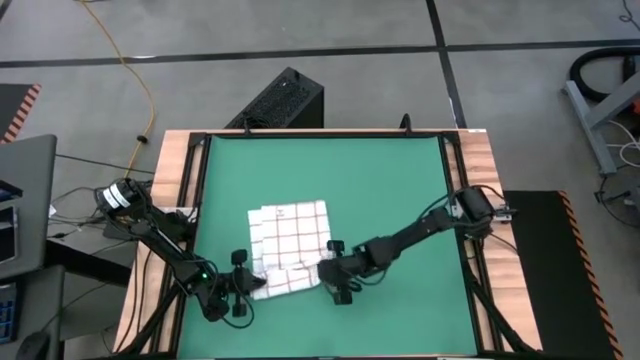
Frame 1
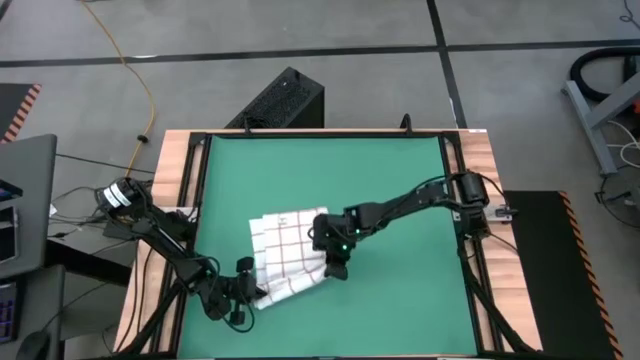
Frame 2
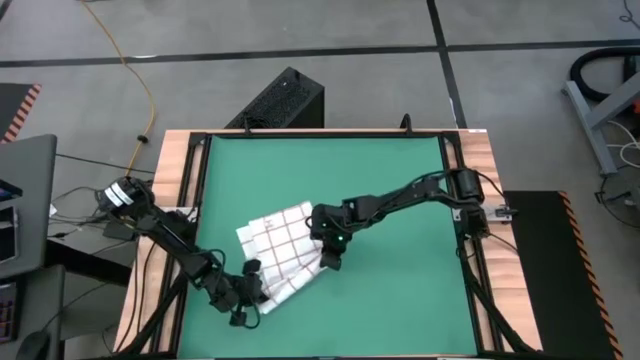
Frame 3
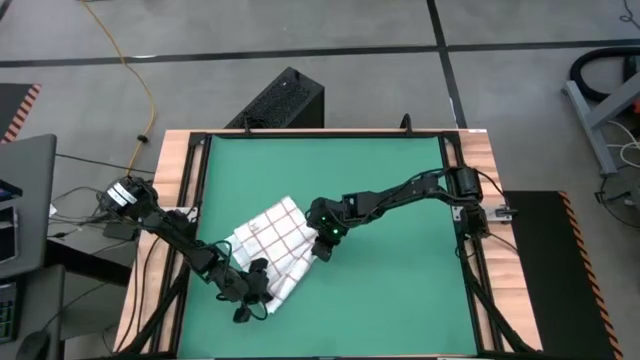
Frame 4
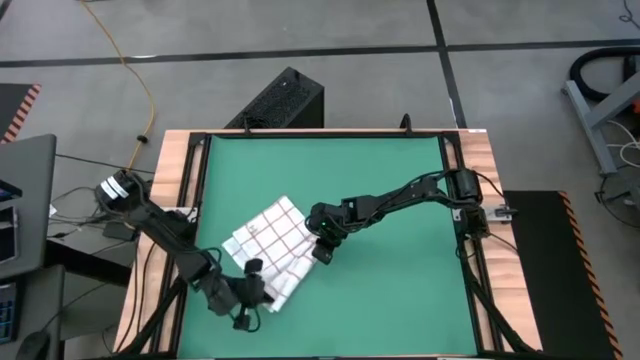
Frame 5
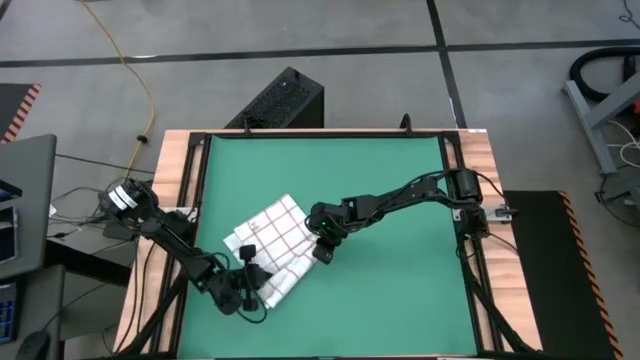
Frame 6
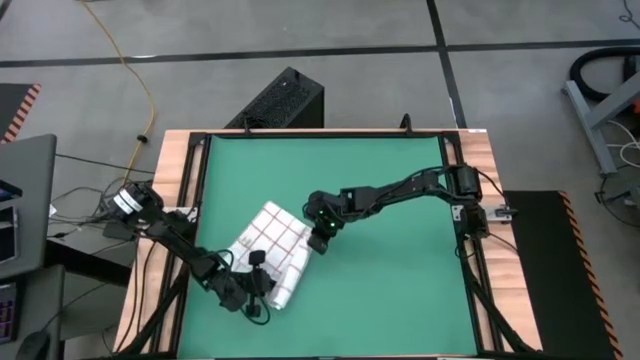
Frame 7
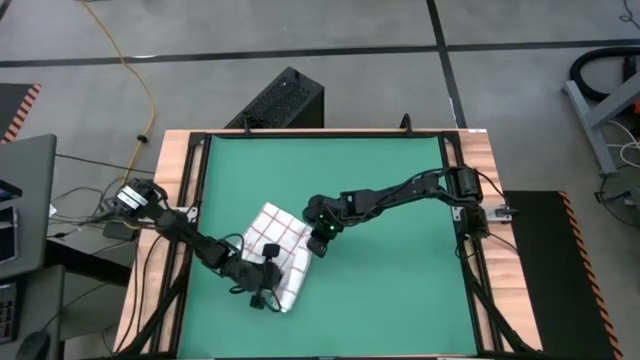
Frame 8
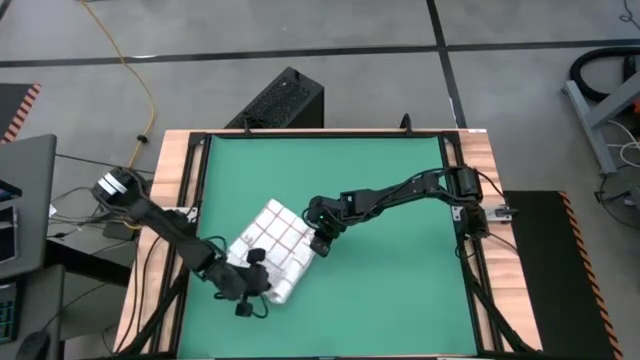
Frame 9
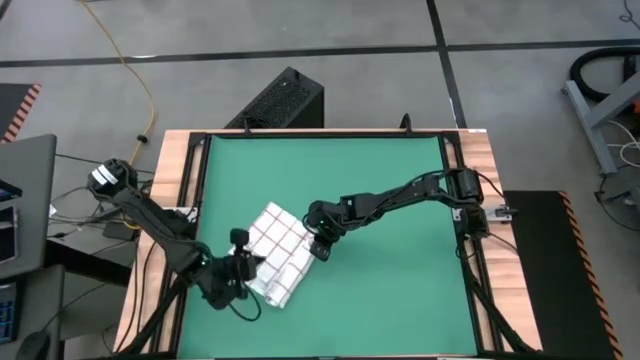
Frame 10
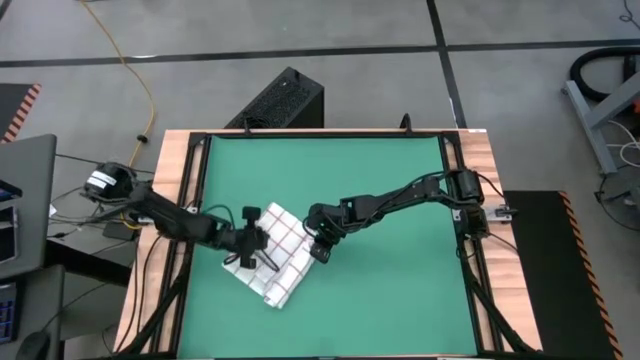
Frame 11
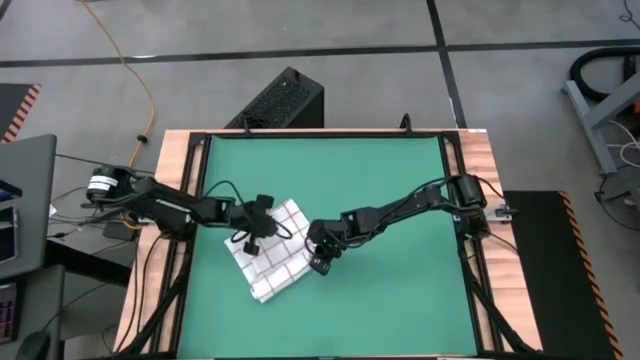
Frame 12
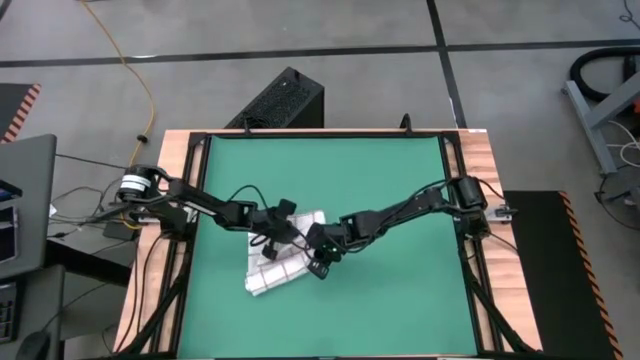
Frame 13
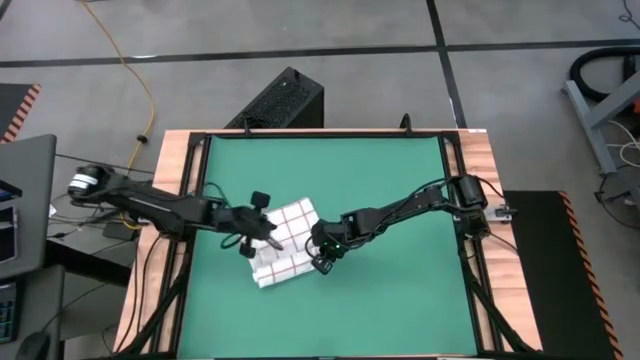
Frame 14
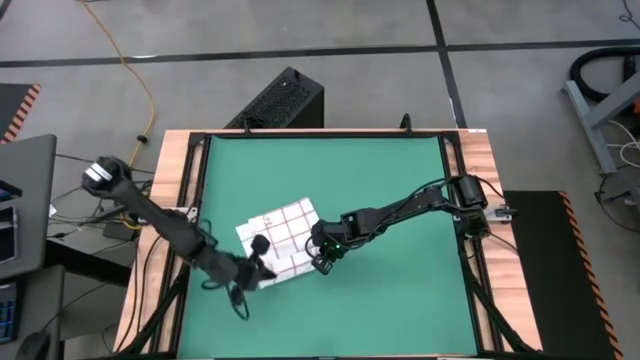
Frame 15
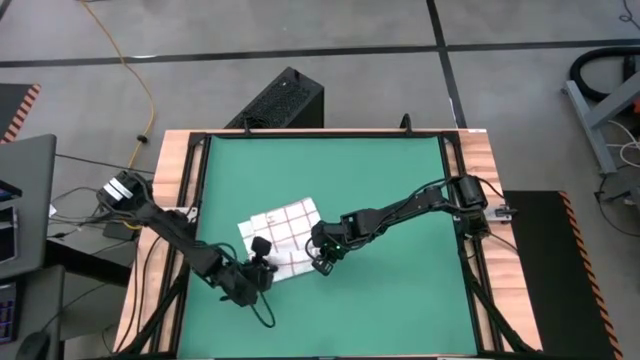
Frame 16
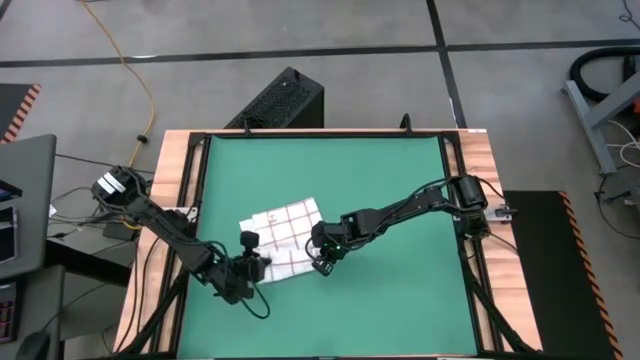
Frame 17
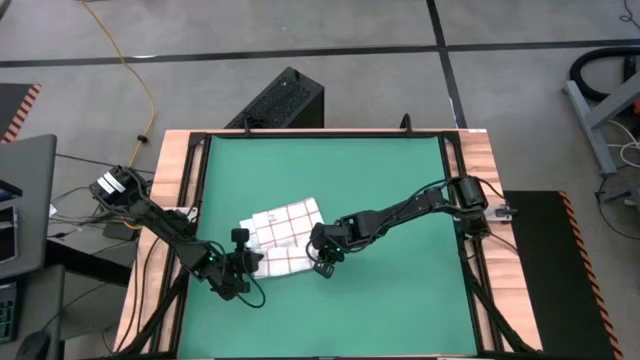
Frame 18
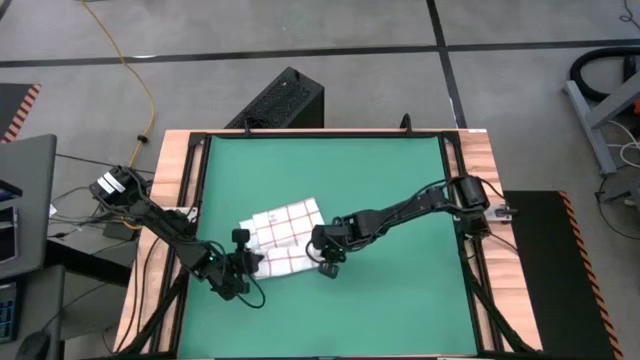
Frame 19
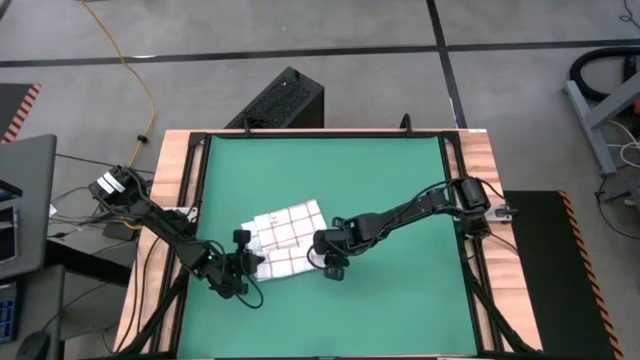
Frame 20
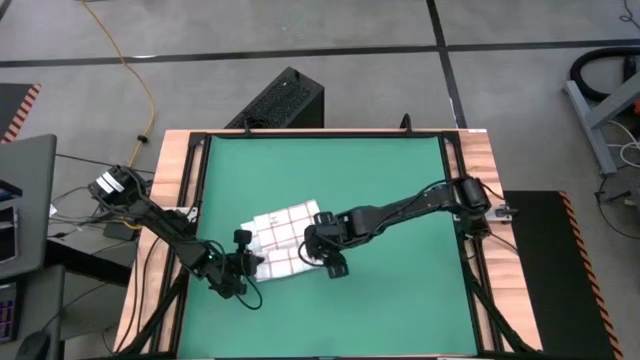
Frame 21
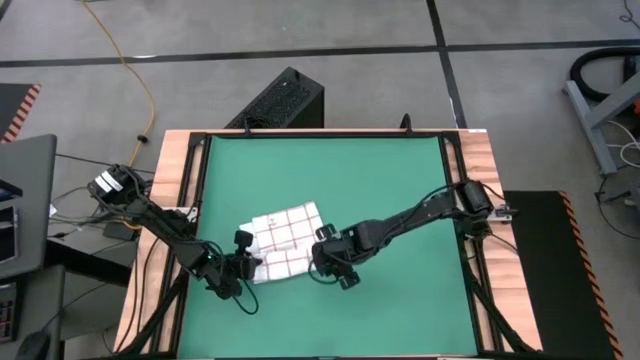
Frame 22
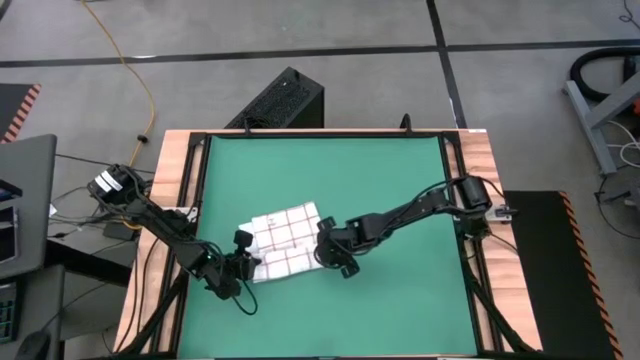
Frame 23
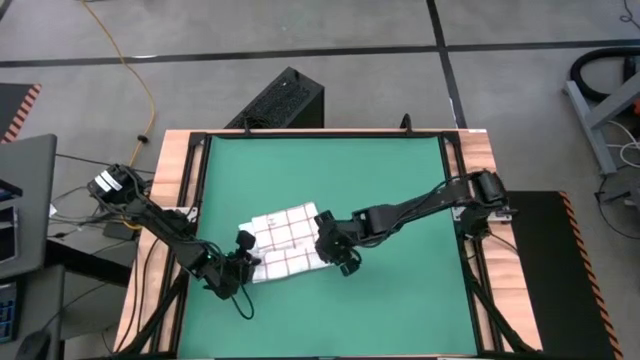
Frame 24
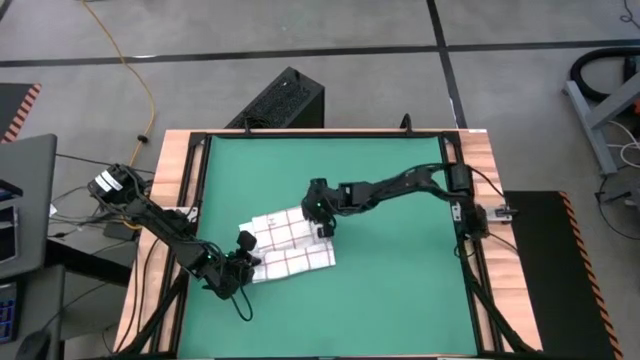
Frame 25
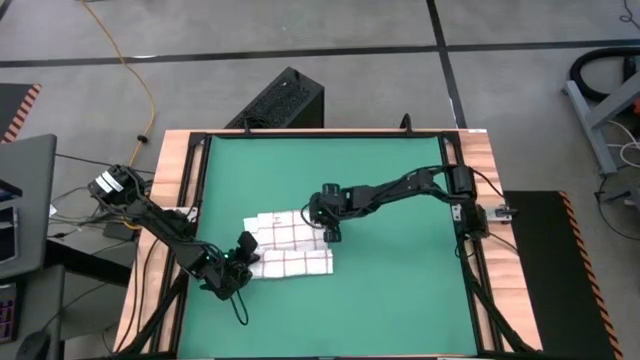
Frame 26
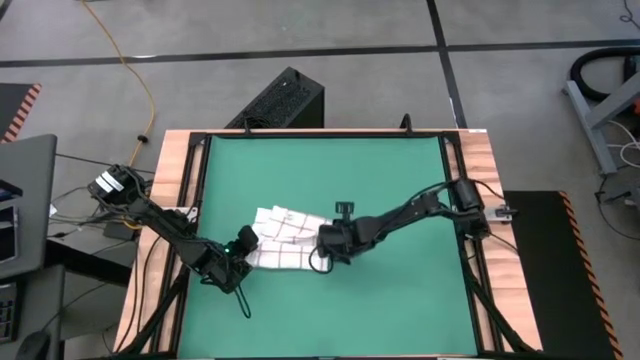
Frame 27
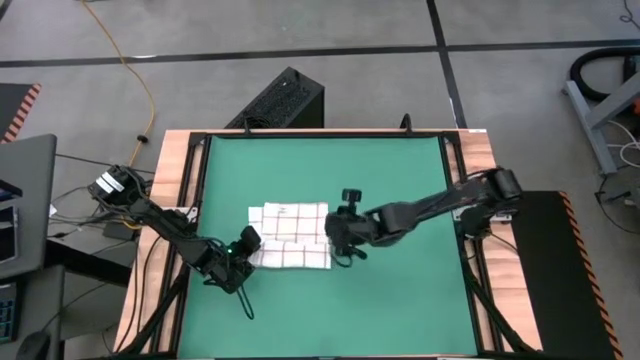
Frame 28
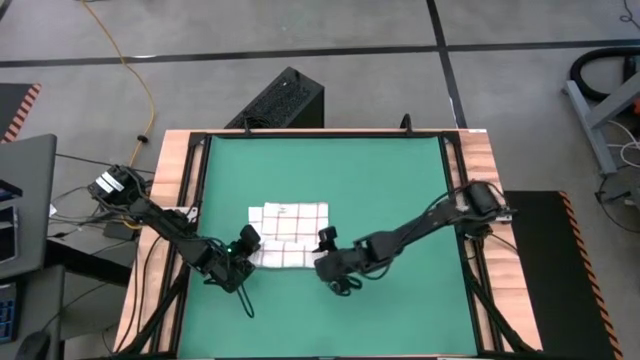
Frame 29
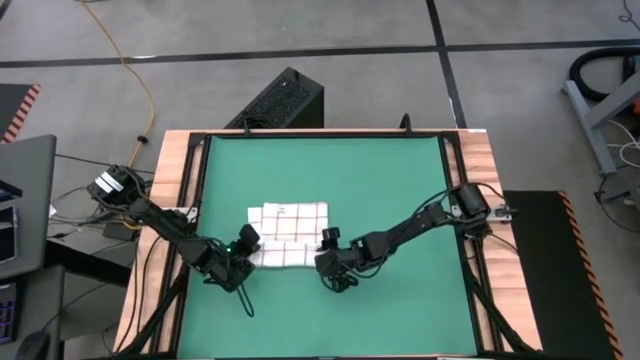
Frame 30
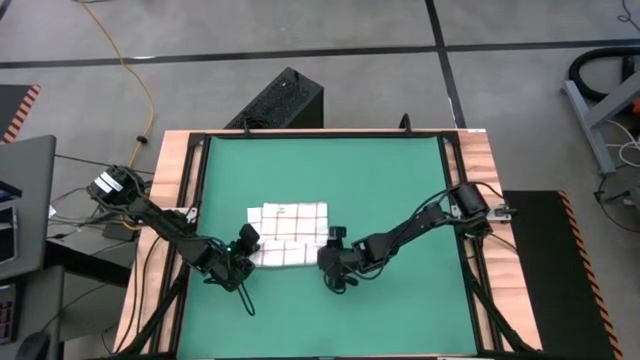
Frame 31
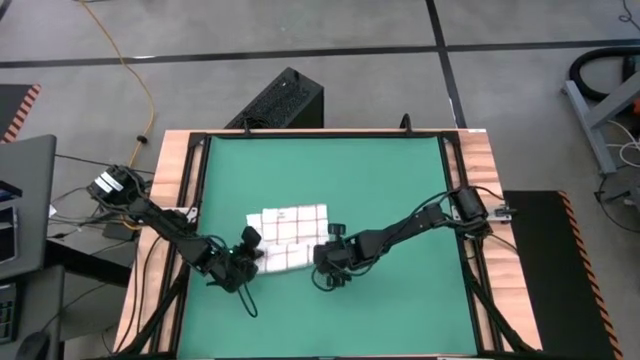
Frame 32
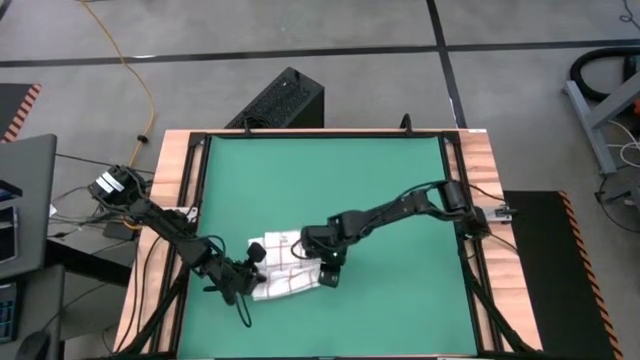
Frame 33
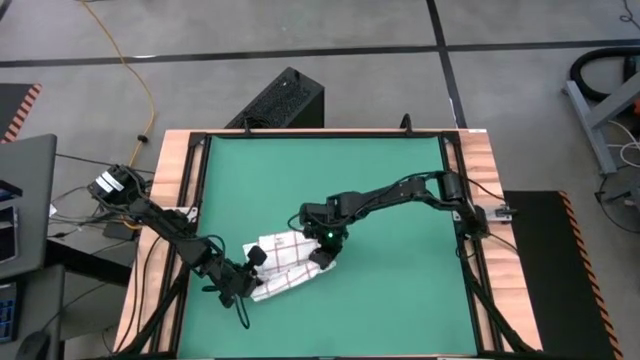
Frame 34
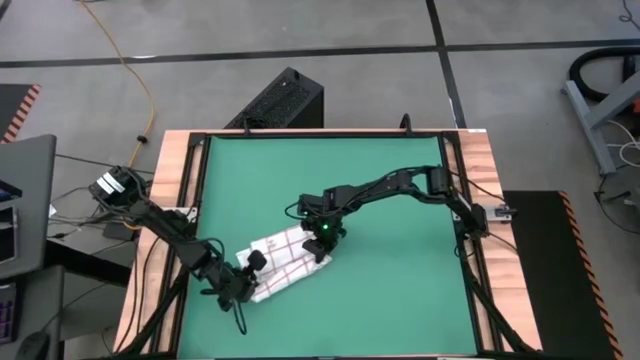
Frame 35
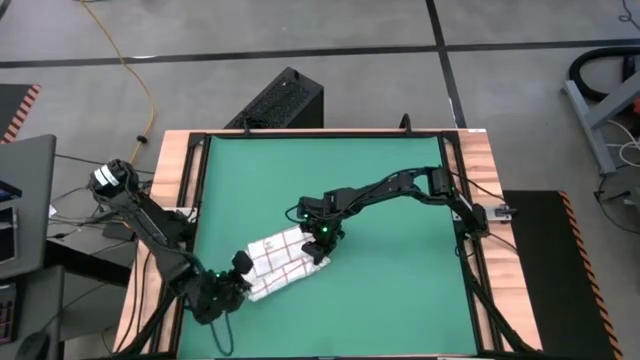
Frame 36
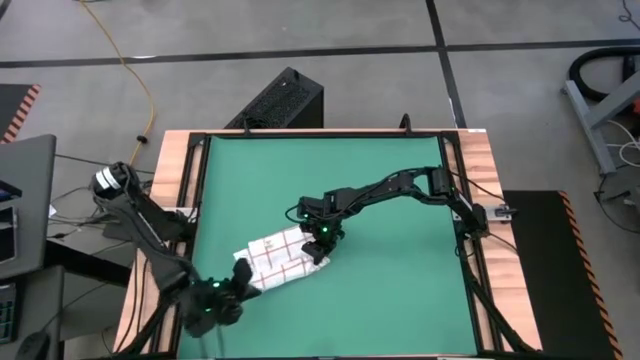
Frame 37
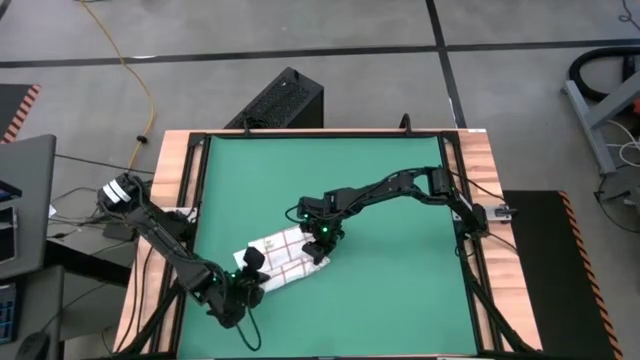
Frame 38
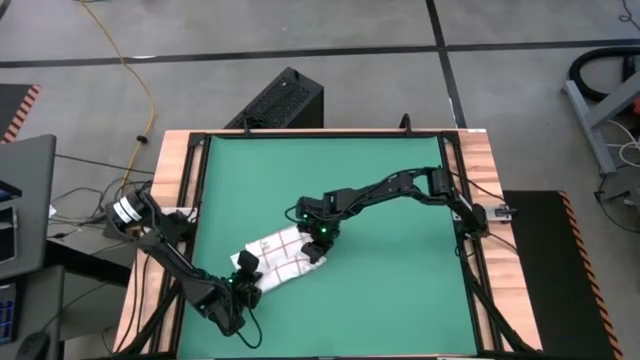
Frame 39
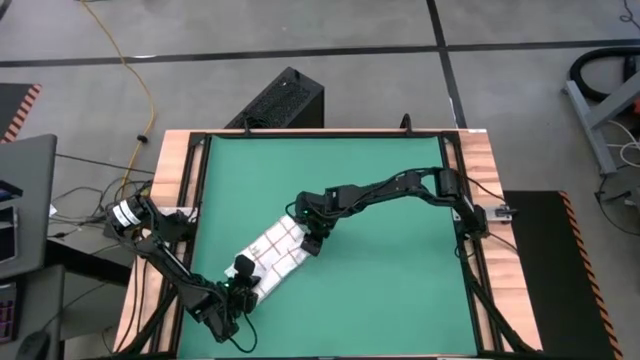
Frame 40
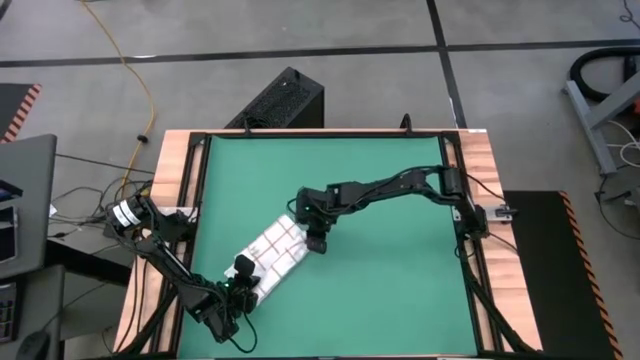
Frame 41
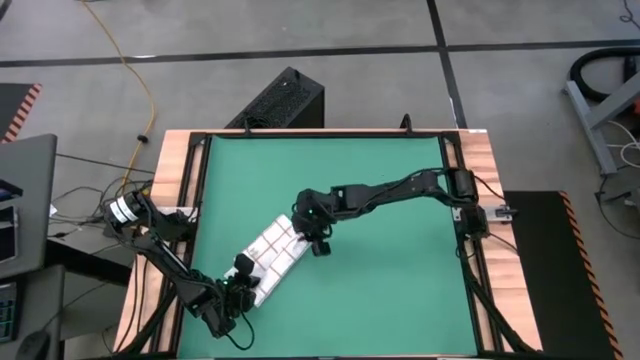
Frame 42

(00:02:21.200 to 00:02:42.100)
Task: Roll towel
Roll the white towel
